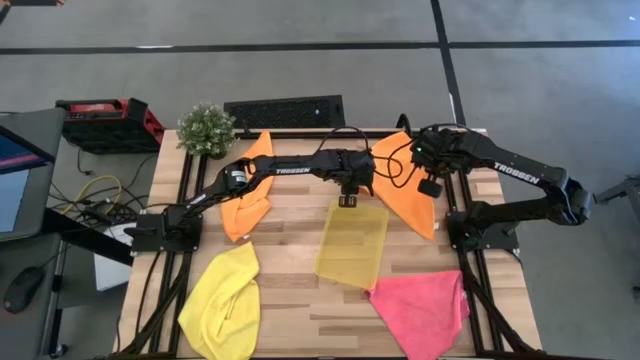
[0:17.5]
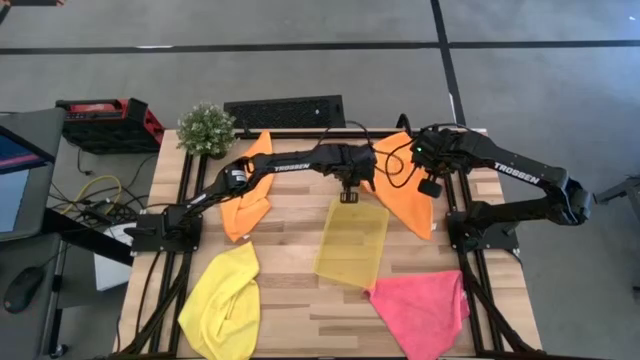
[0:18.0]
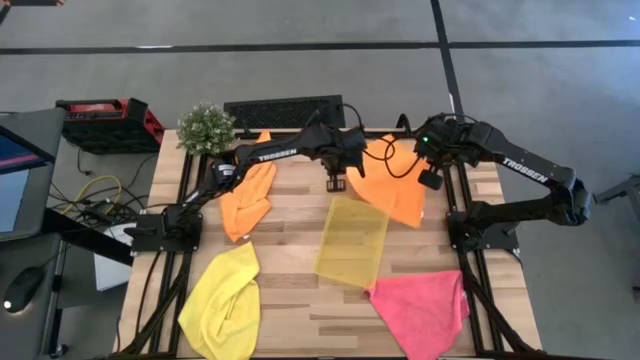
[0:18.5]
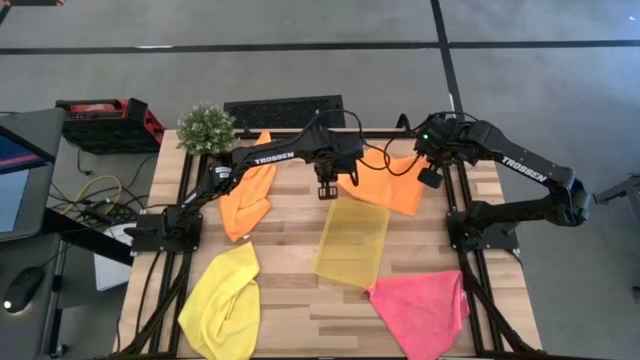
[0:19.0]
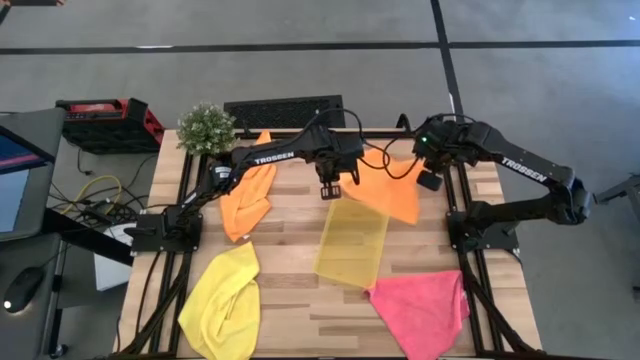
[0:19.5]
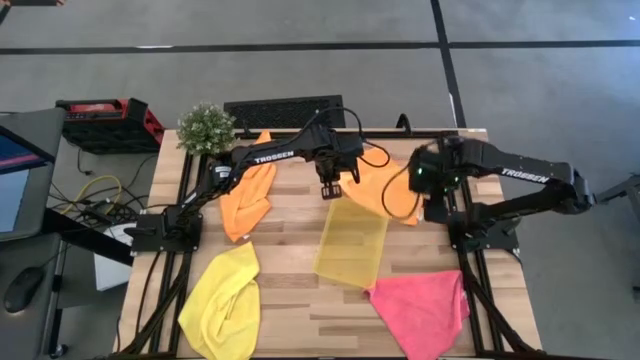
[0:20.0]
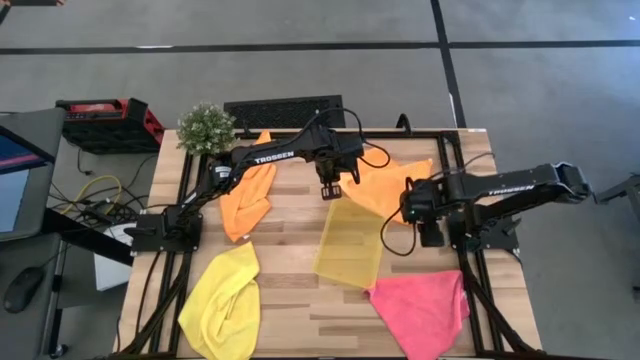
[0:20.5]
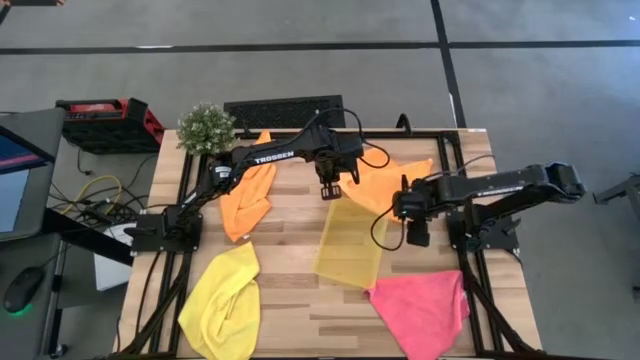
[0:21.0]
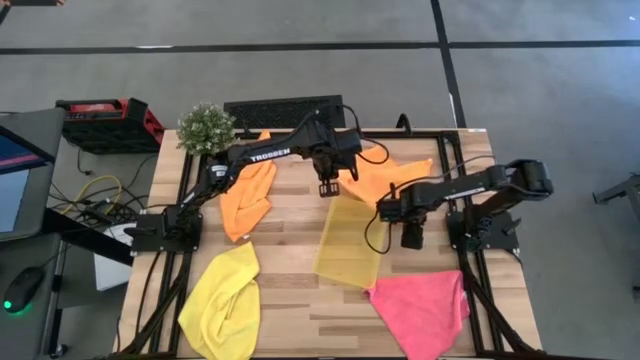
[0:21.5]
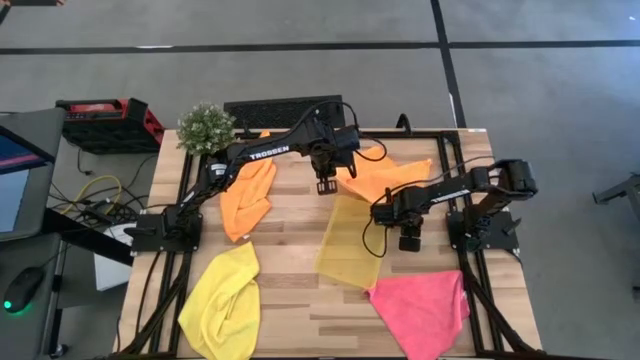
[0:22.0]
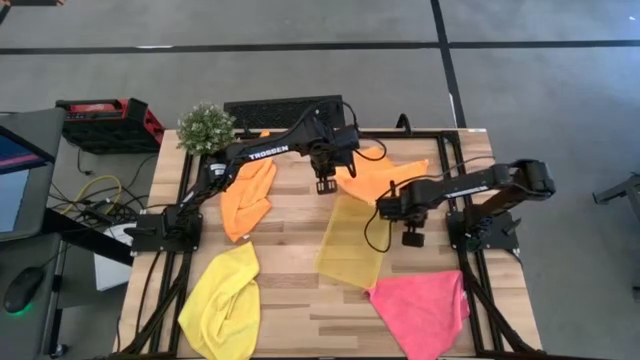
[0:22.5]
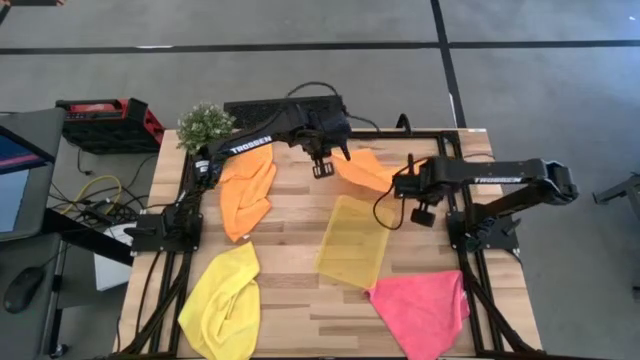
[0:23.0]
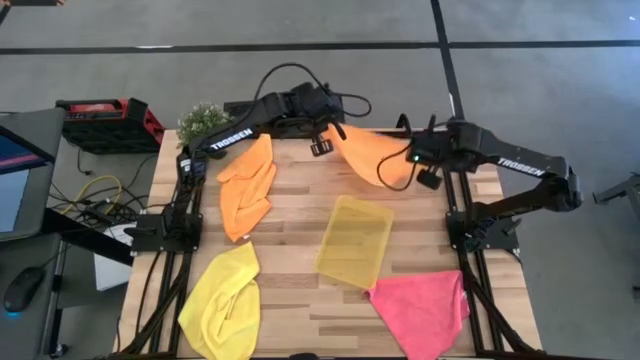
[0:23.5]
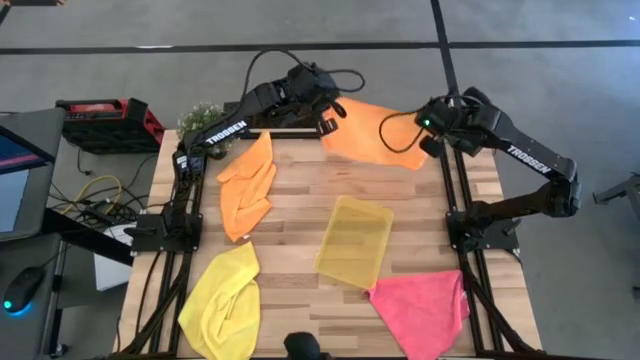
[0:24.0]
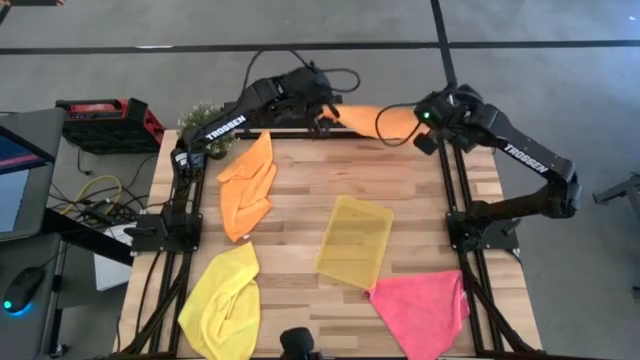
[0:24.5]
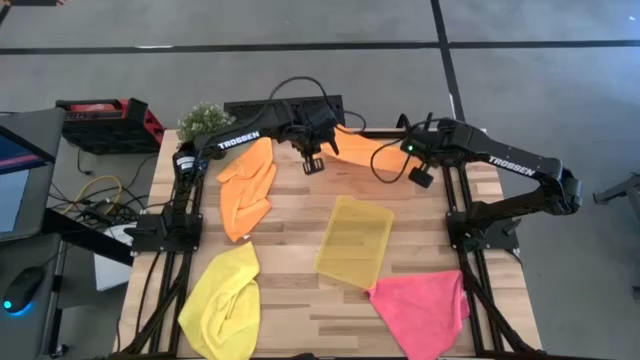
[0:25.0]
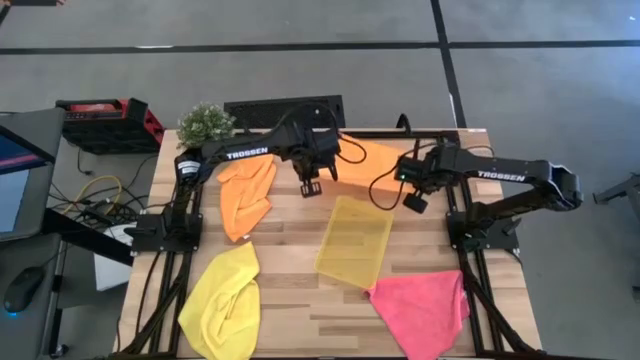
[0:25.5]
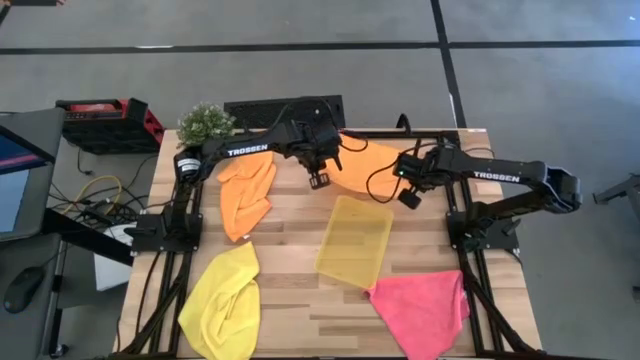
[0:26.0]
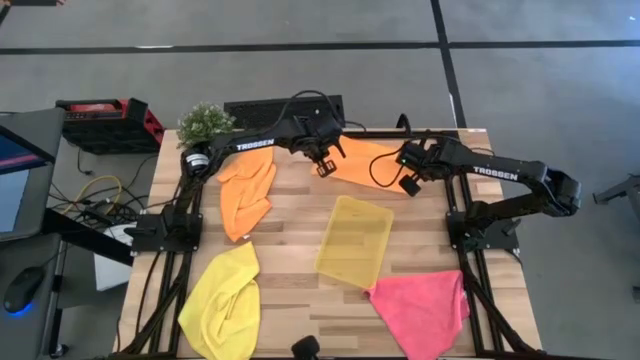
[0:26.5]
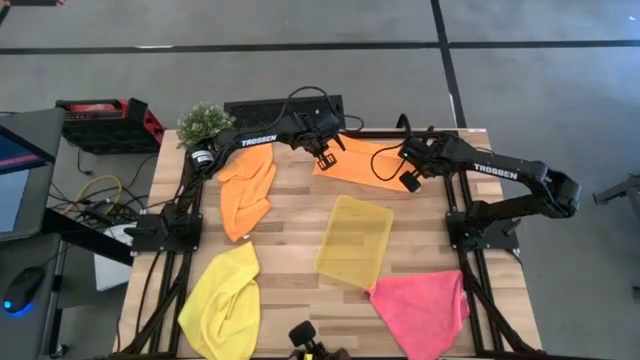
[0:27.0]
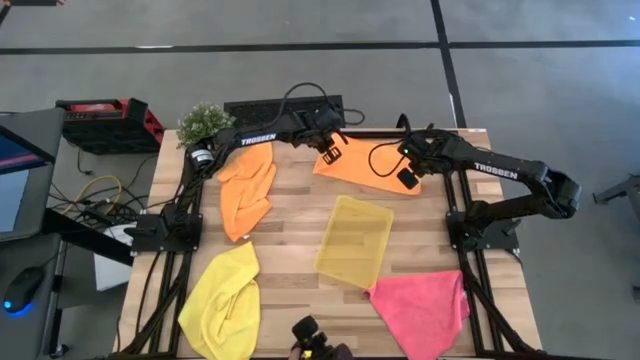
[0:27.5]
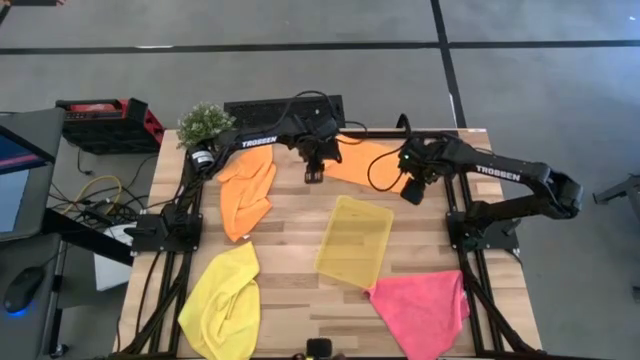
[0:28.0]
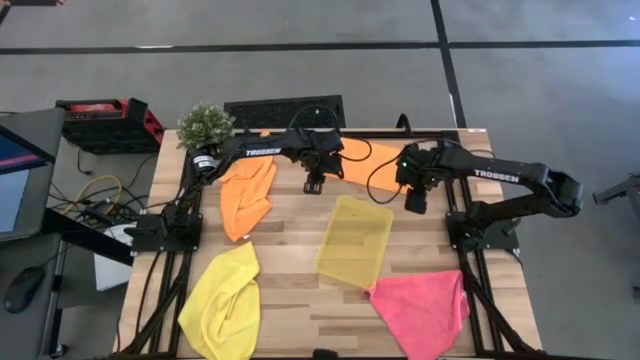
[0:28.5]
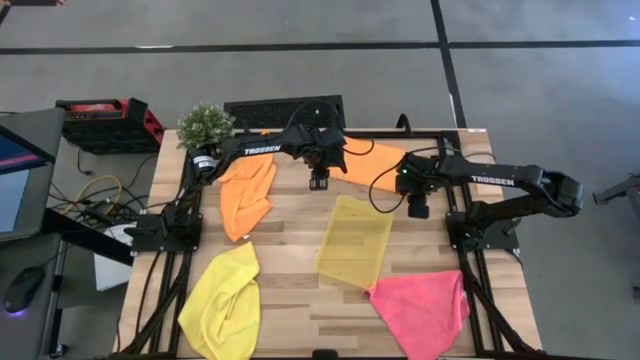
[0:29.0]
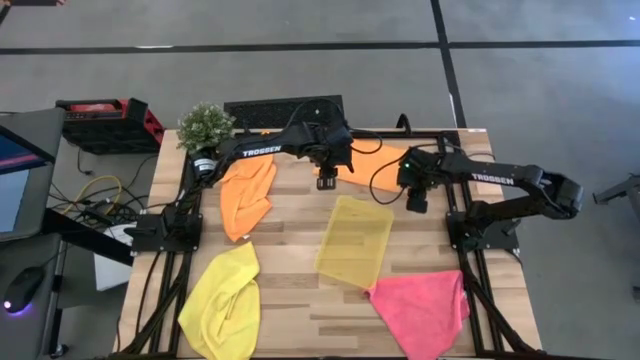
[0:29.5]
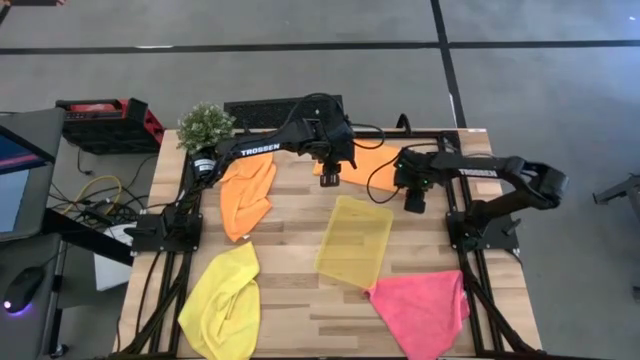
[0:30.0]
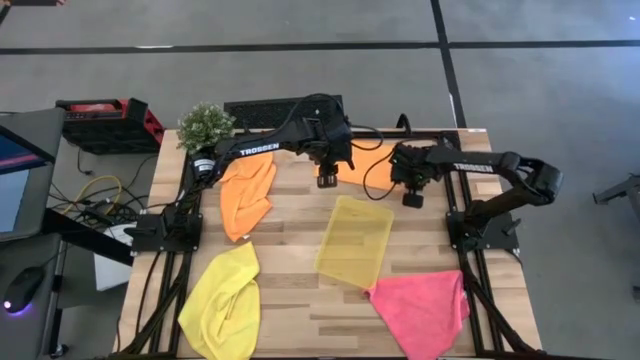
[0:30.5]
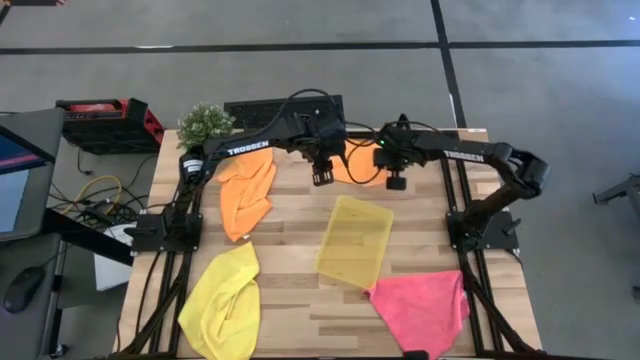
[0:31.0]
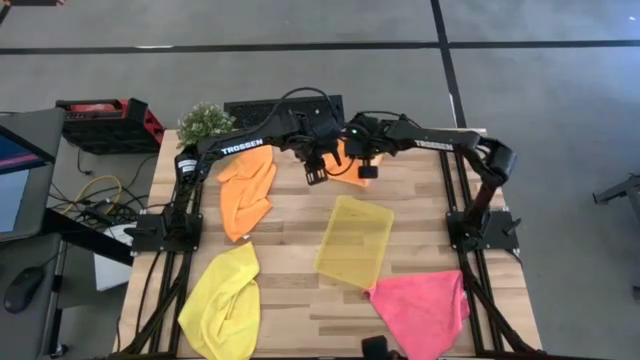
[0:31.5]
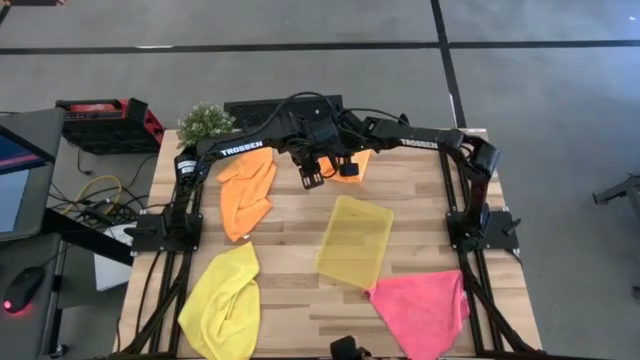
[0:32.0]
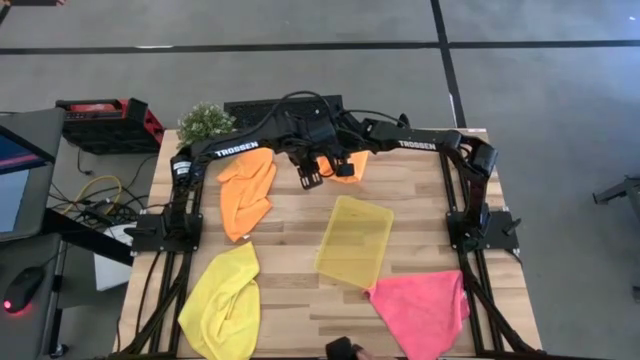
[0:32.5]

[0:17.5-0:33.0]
Task: Fold microfiber towels
Fold the right orange microfiber towel

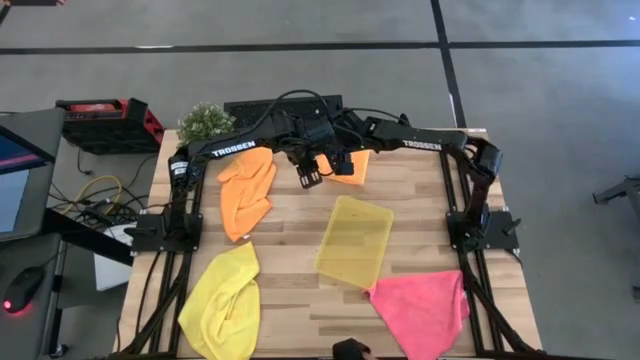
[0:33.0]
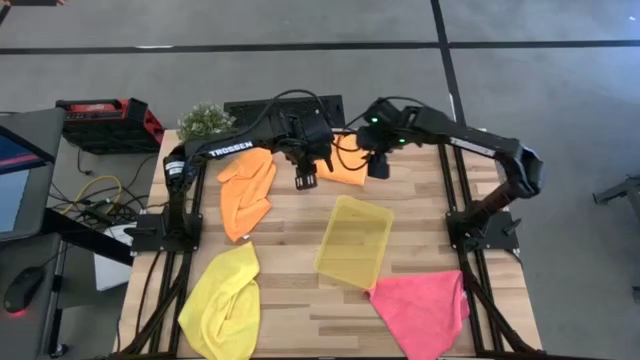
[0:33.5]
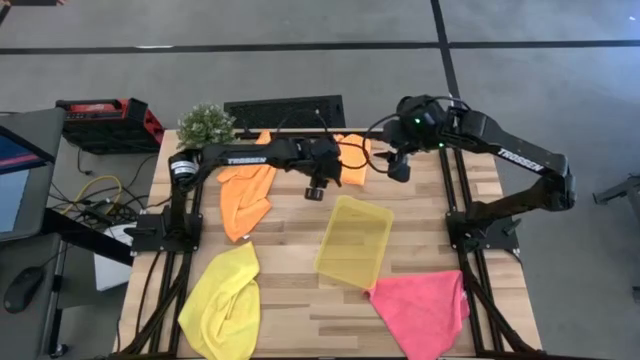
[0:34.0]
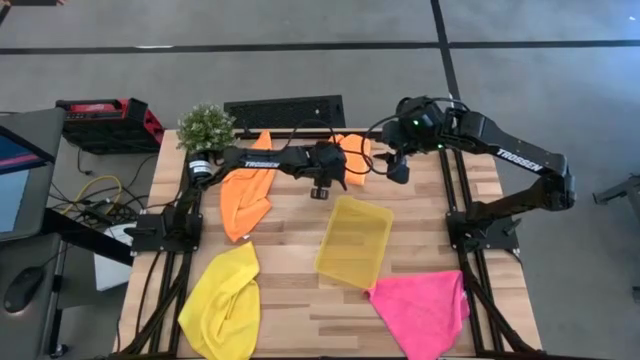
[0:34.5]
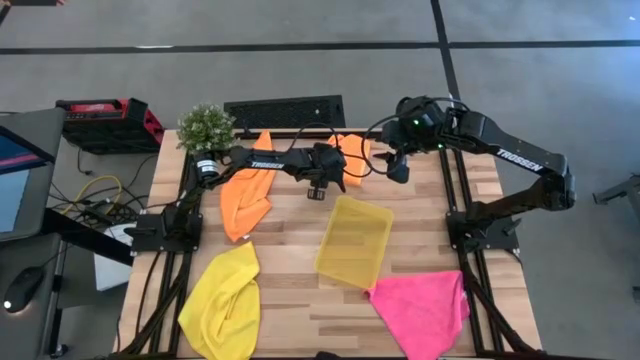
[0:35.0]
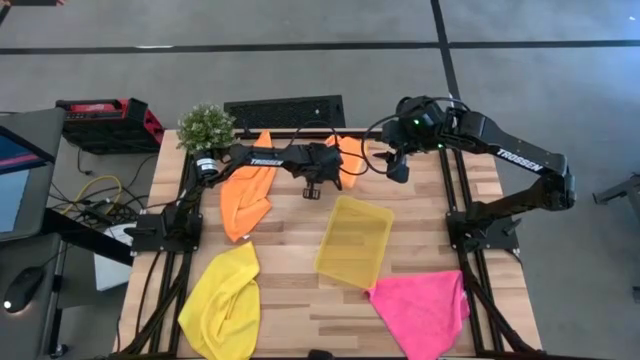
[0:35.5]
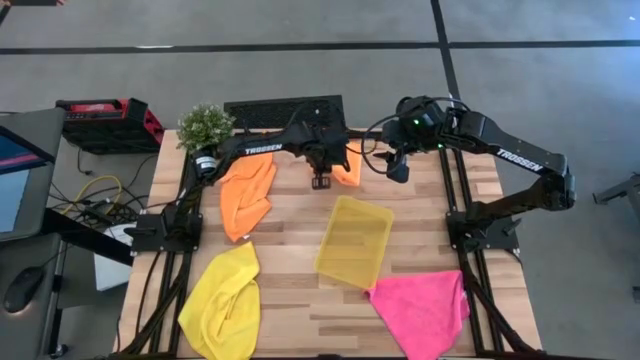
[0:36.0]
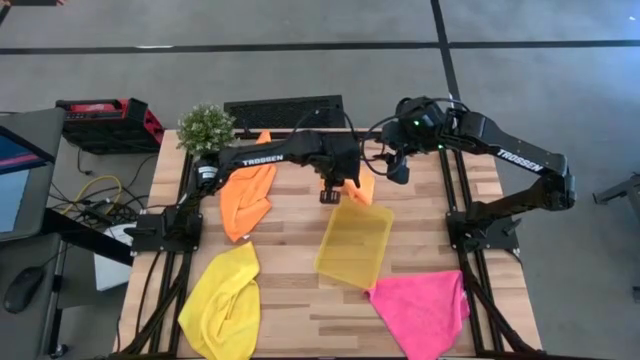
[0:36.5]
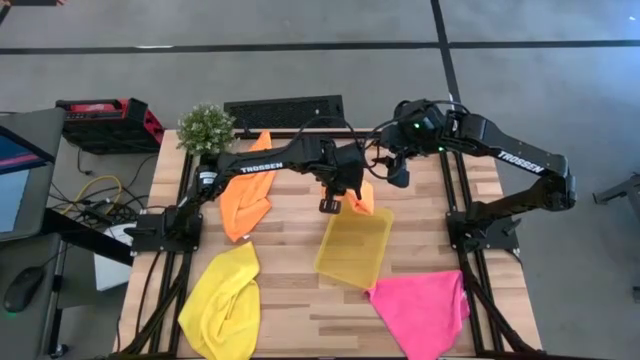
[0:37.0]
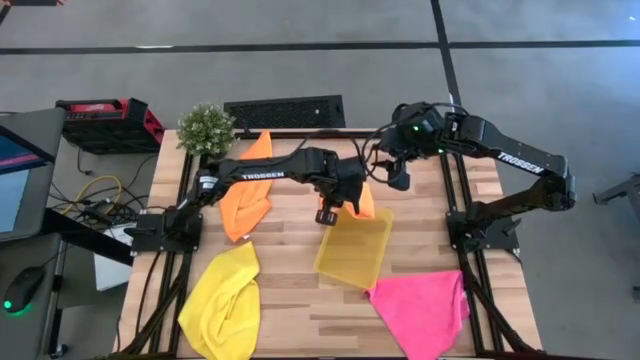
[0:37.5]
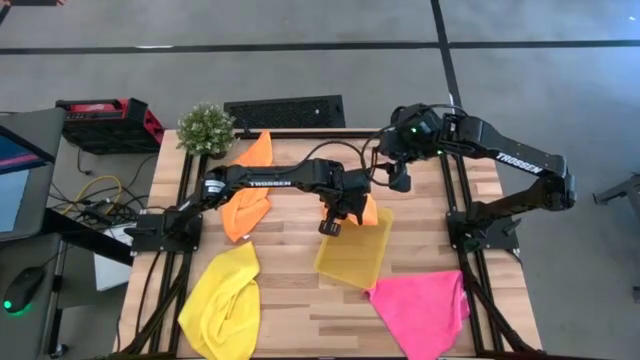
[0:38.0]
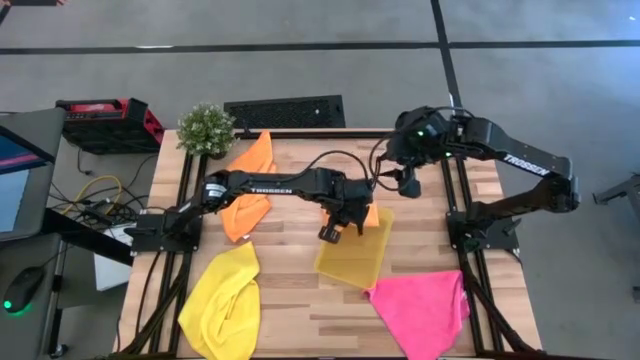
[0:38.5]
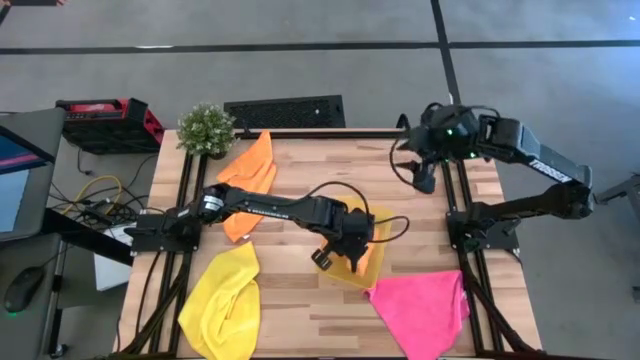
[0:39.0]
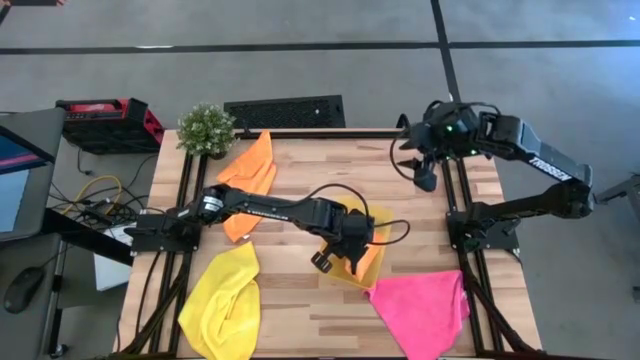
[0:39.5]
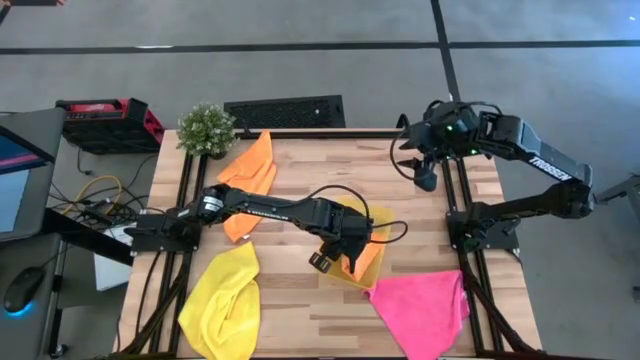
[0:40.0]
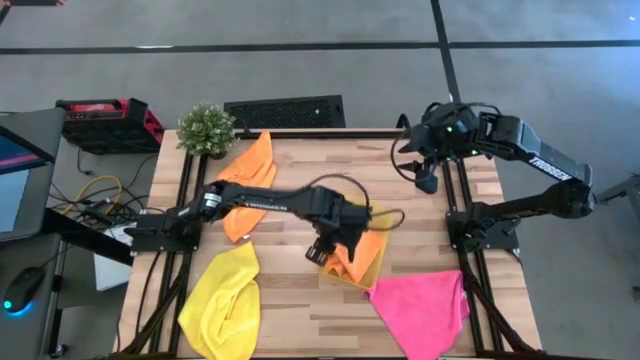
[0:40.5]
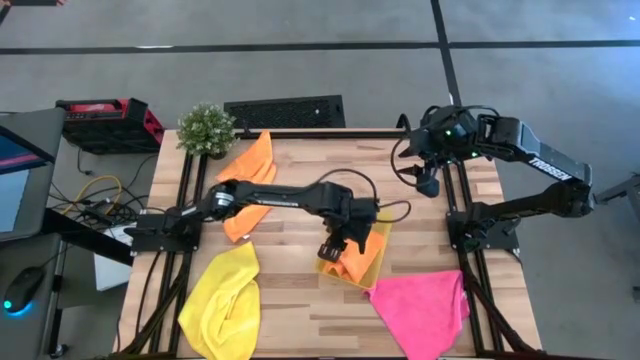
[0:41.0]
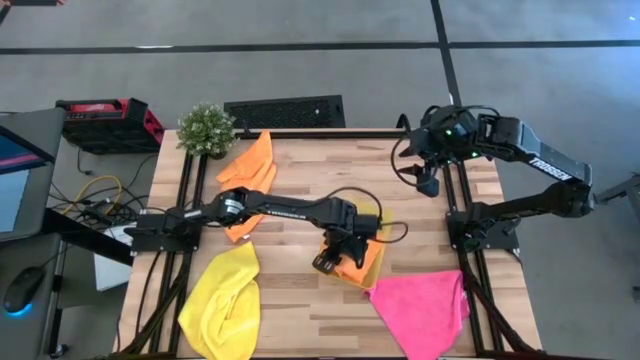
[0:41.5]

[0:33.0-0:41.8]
Put the folded right orange microfiber towel into the yellow bin
